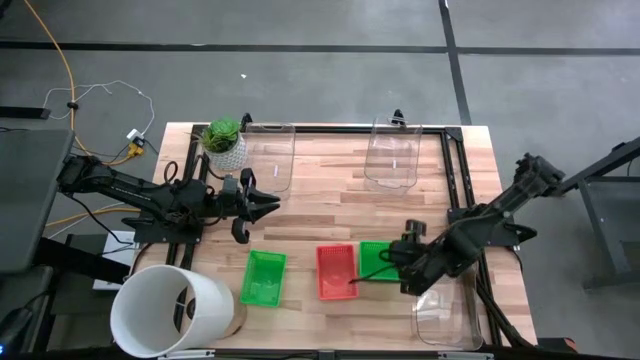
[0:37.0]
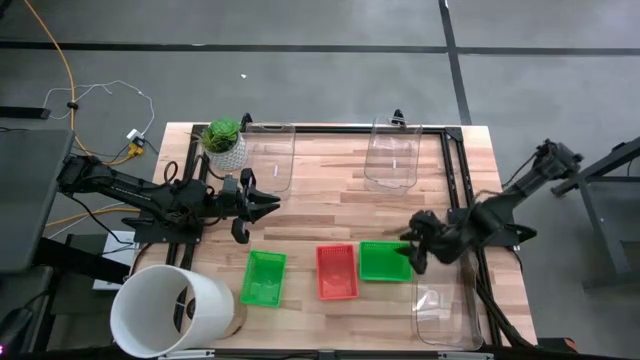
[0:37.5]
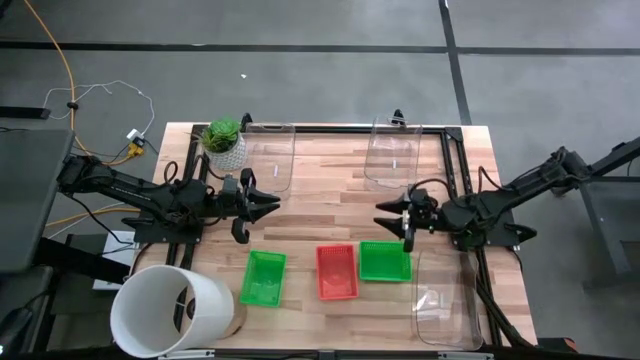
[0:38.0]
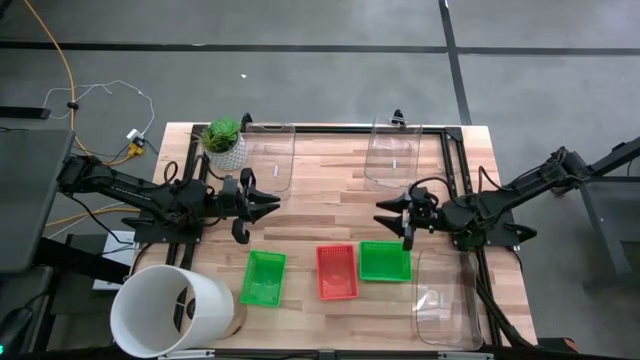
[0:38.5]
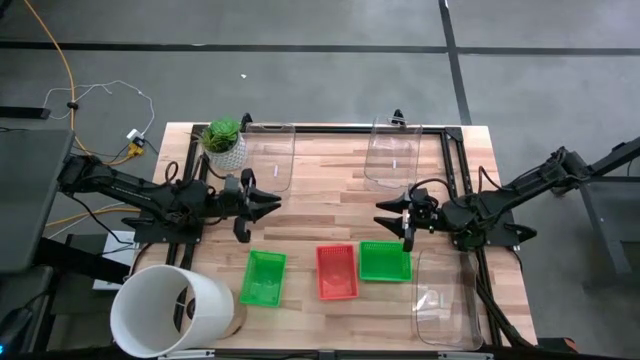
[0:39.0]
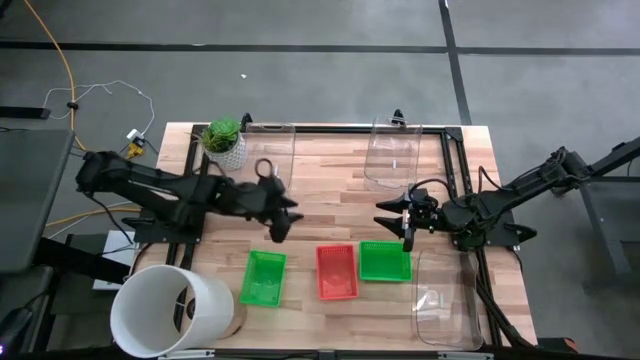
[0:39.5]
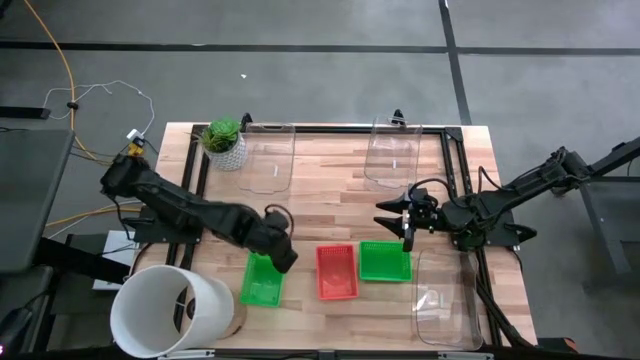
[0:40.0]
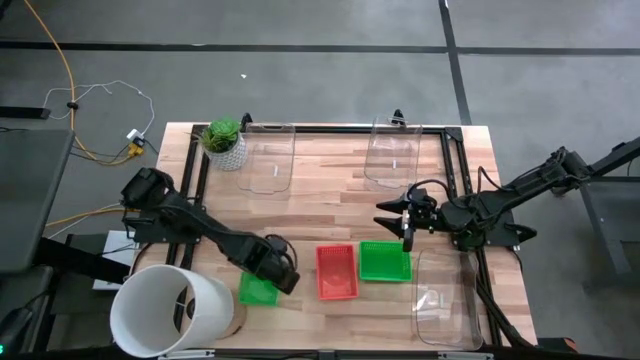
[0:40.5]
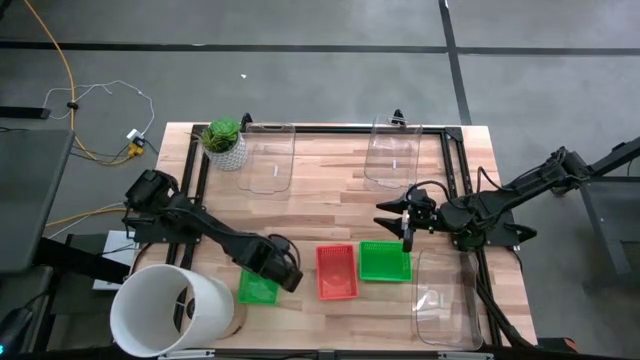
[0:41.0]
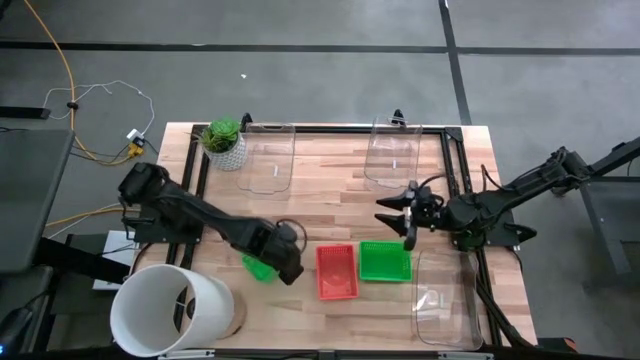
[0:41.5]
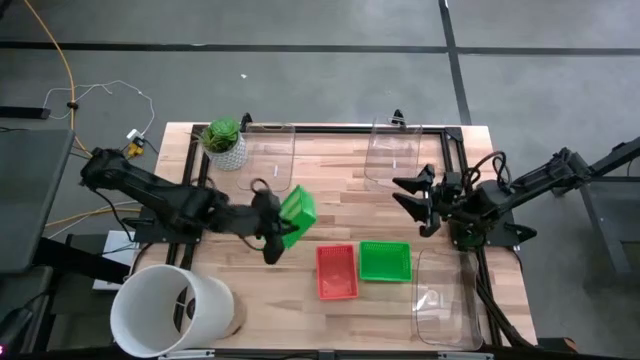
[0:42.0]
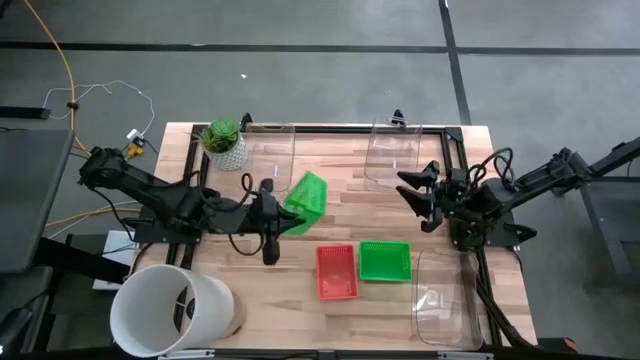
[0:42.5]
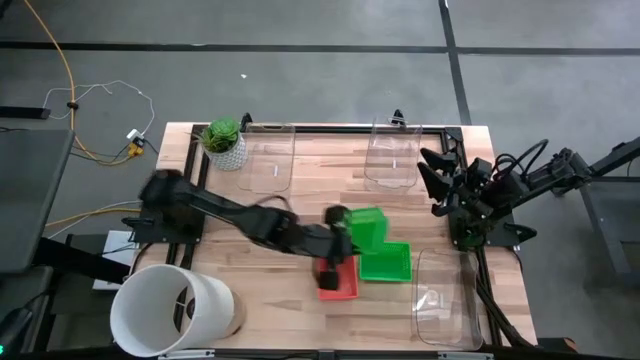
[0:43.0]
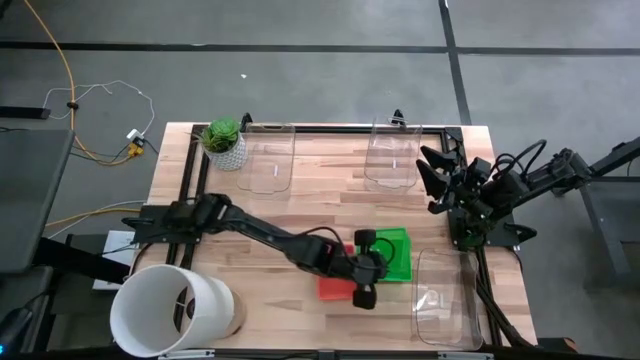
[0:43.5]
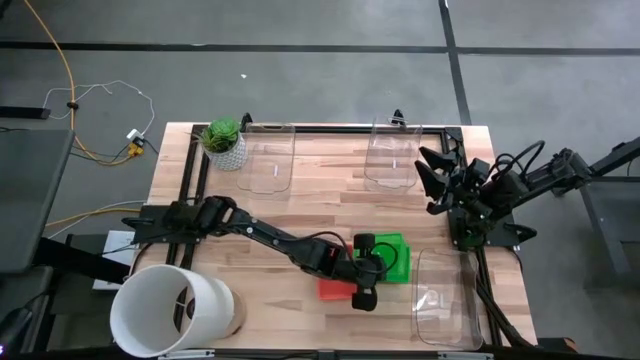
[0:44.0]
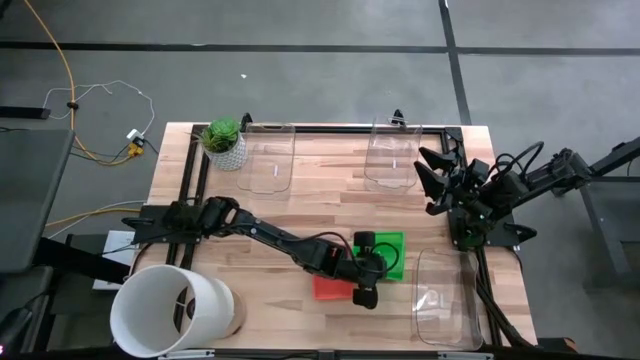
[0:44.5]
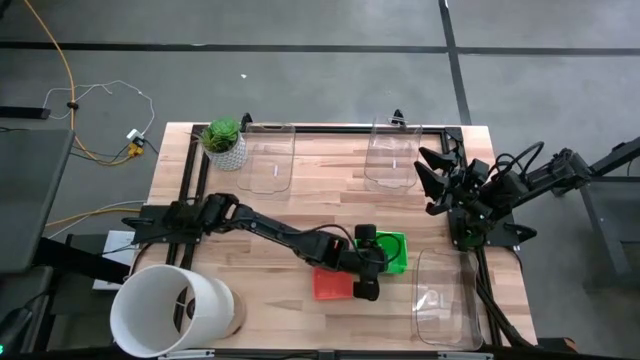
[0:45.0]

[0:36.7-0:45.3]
Stack the left green bin on the stacked right green bins

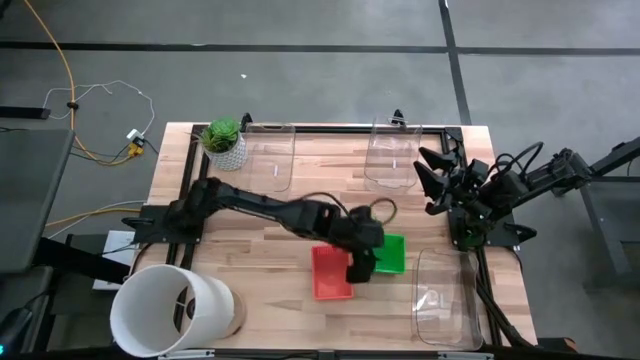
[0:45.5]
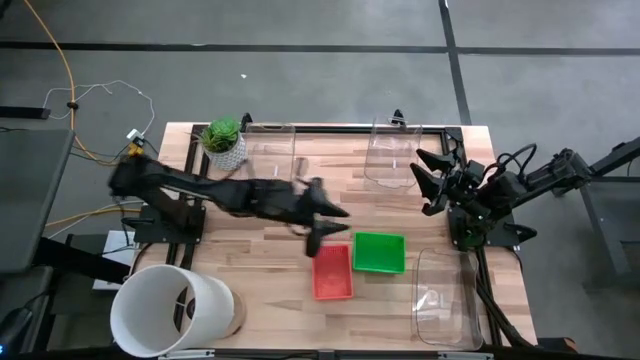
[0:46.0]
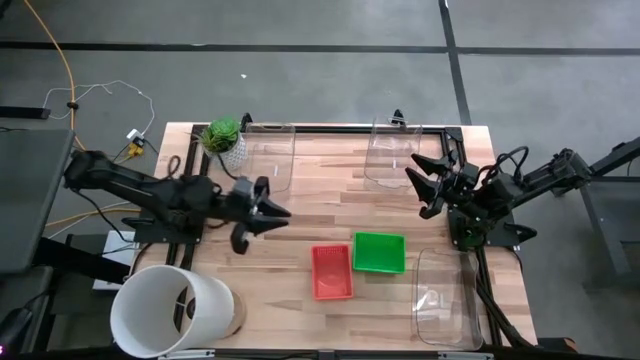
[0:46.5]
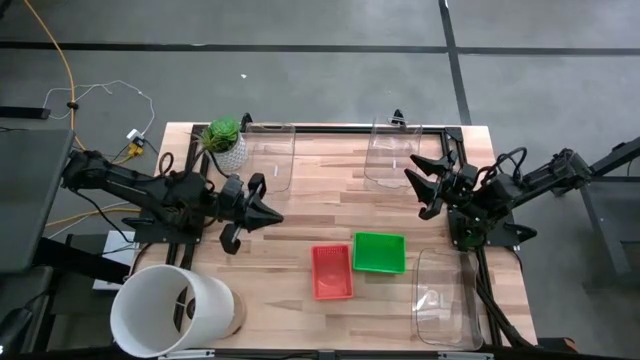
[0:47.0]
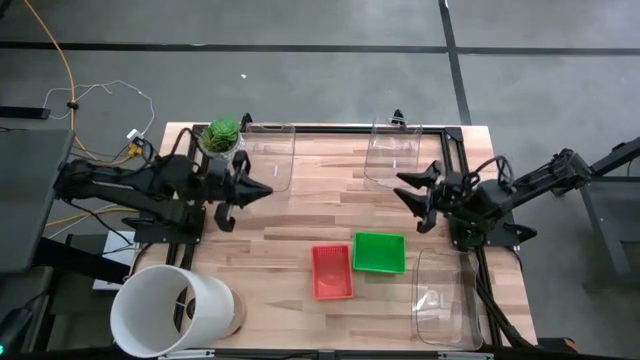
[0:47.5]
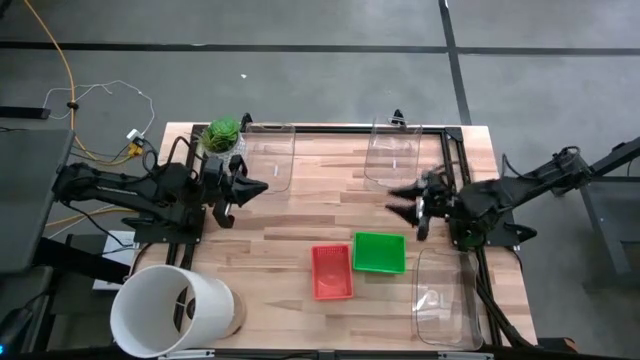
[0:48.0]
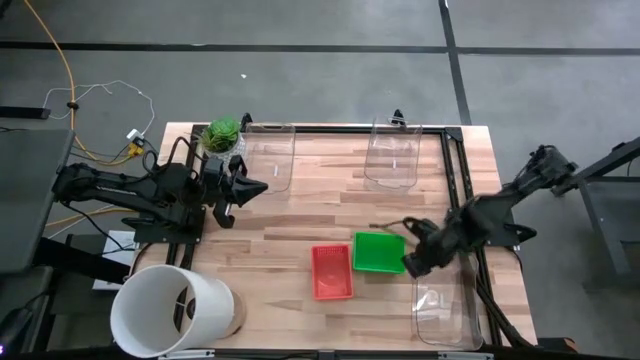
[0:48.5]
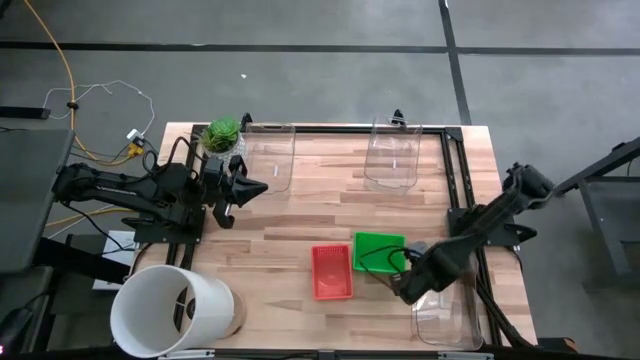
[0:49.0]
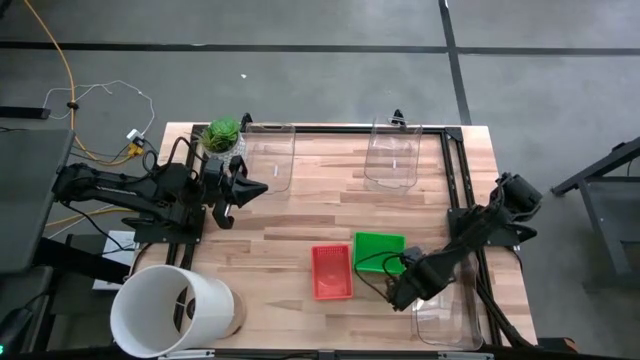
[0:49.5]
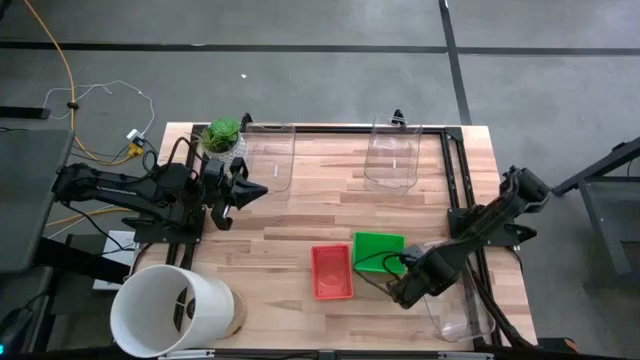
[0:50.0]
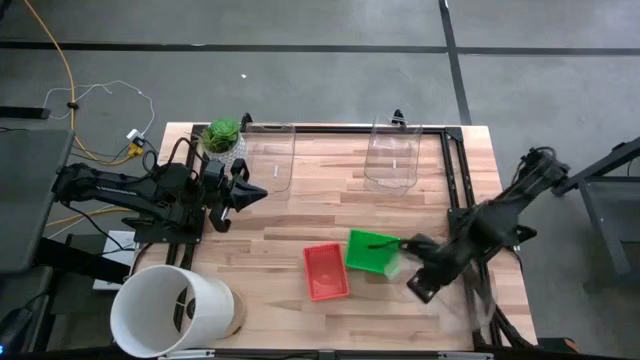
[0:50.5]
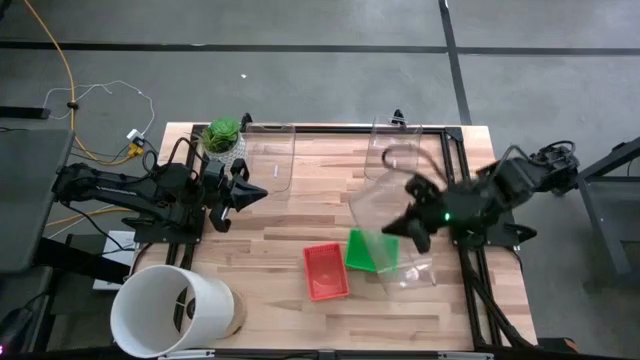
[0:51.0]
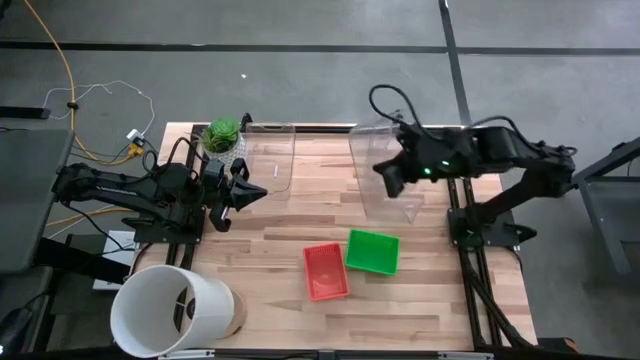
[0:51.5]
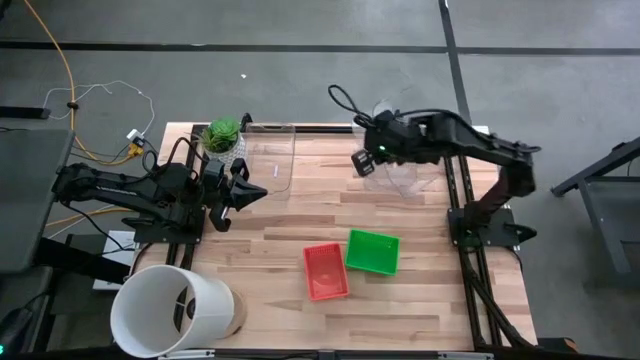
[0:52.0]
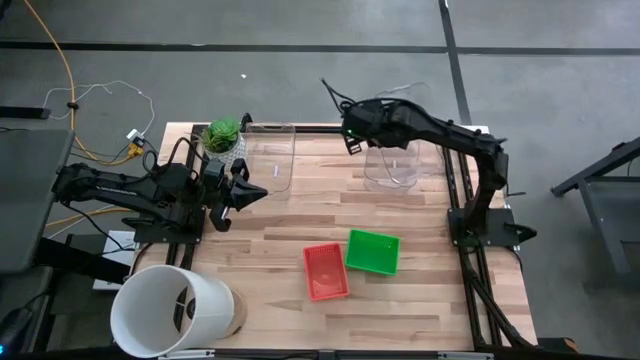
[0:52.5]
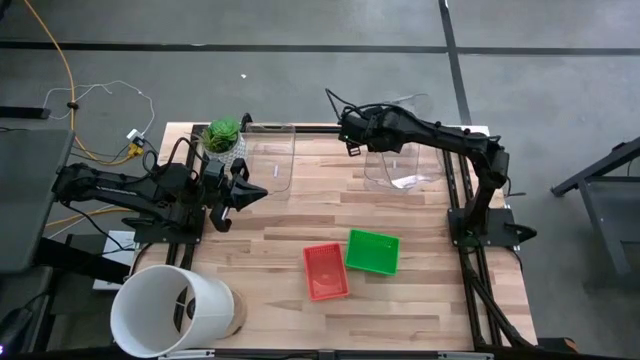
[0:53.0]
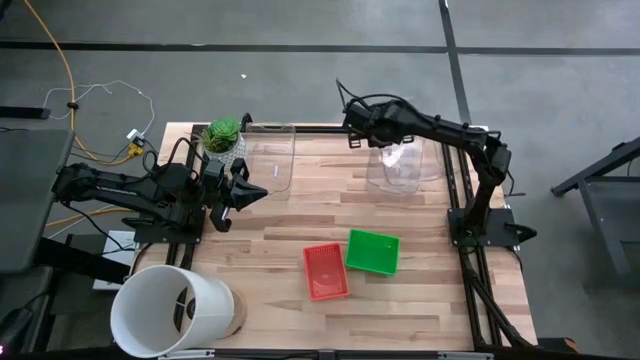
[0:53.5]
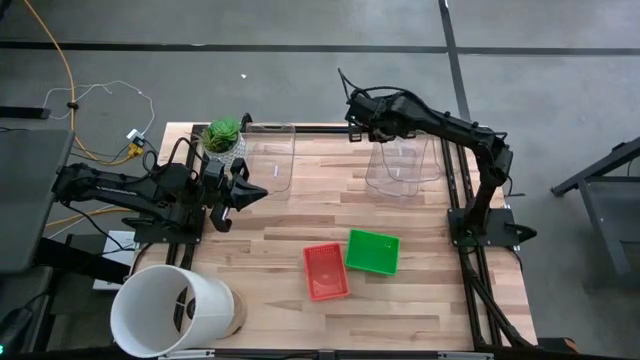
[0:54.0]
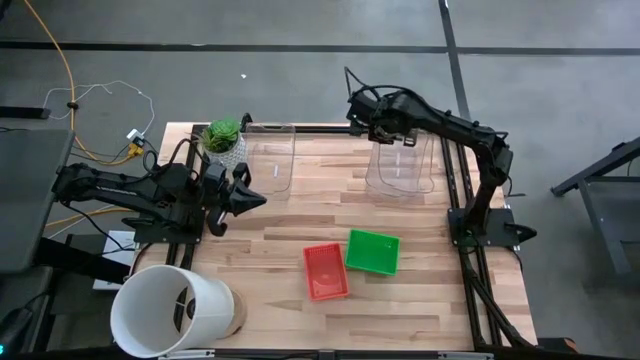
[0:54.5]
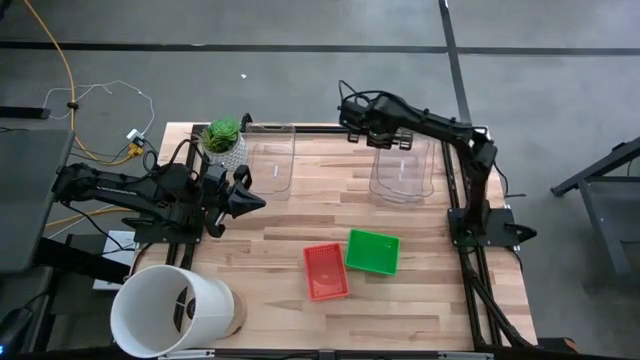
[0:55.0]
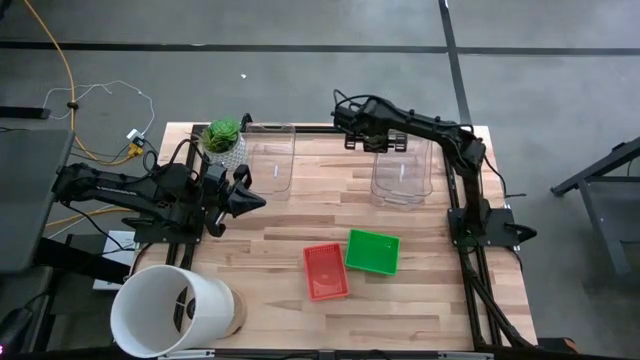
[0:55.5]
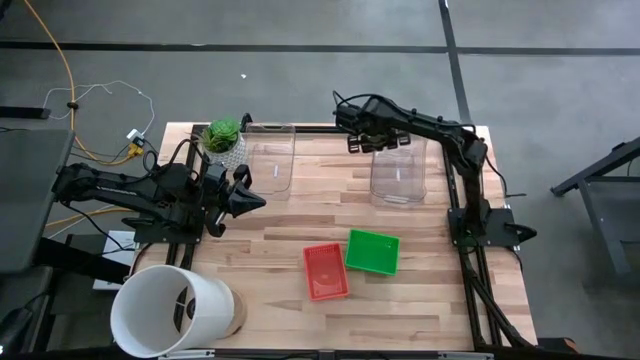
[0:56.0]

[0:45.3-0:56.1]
Stack the bottom transparent bin on the top right transparent bin
